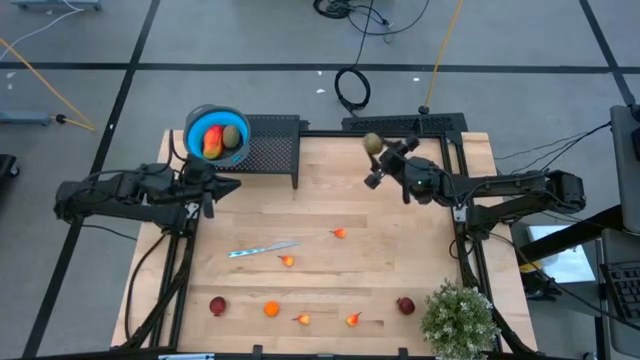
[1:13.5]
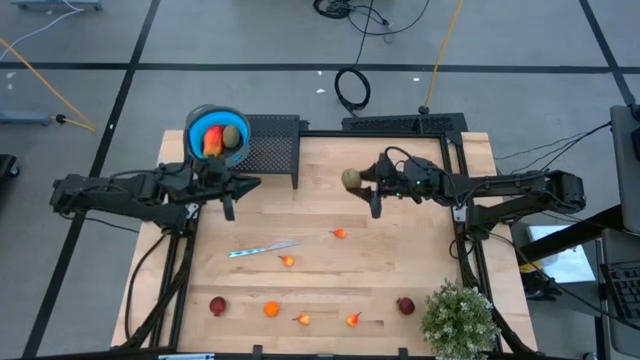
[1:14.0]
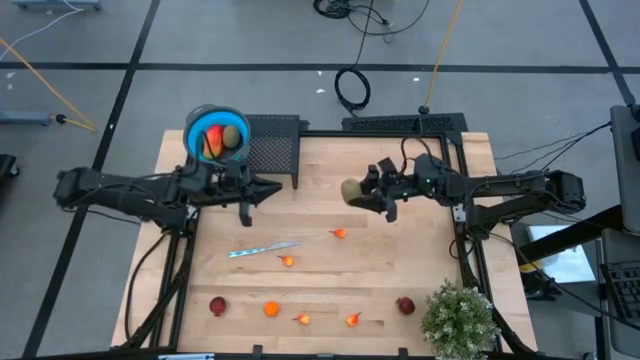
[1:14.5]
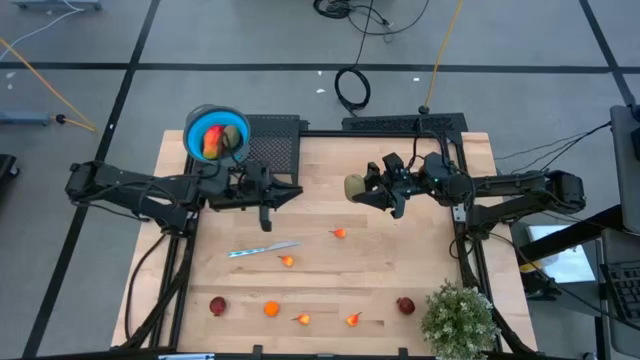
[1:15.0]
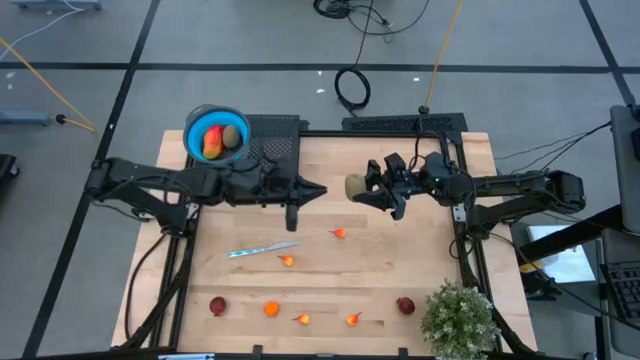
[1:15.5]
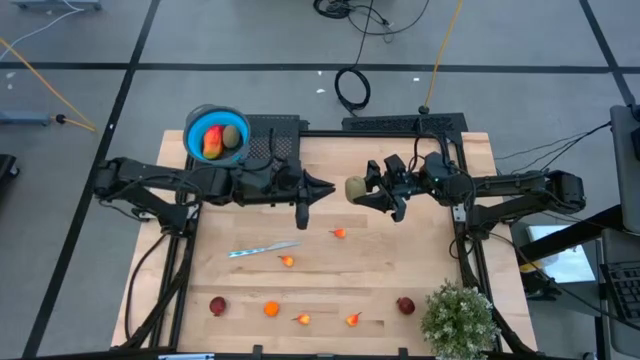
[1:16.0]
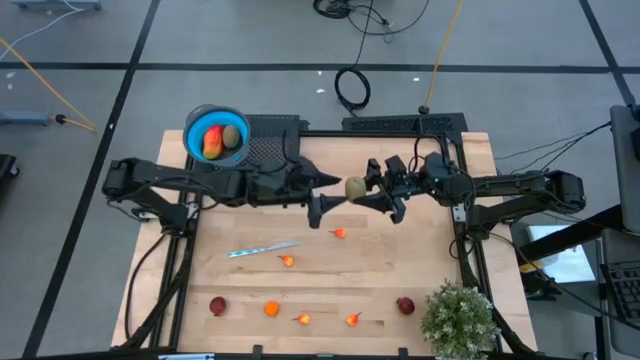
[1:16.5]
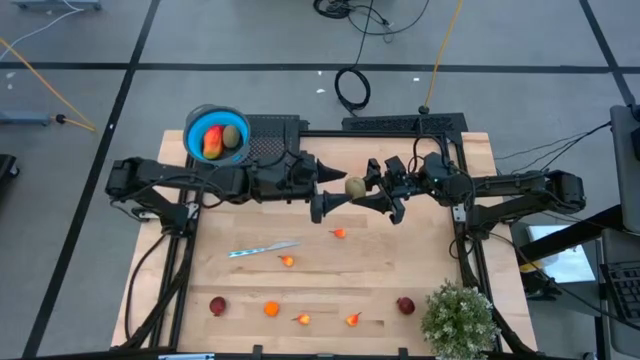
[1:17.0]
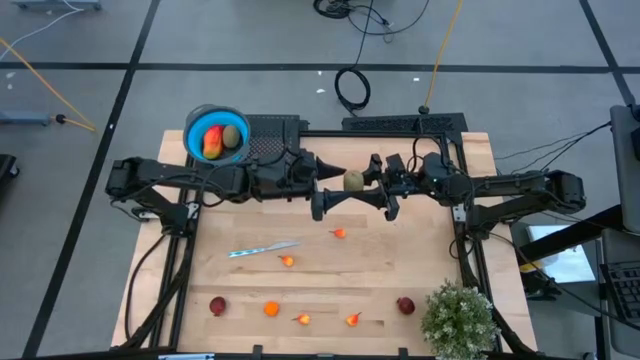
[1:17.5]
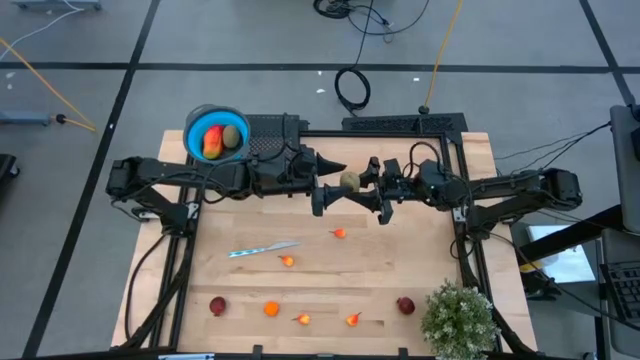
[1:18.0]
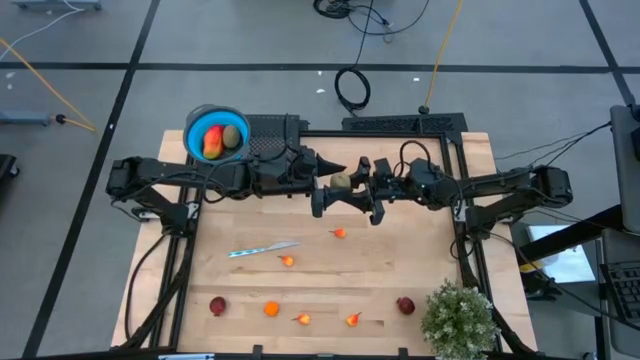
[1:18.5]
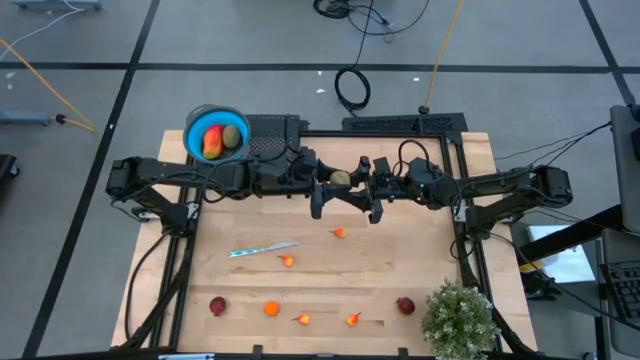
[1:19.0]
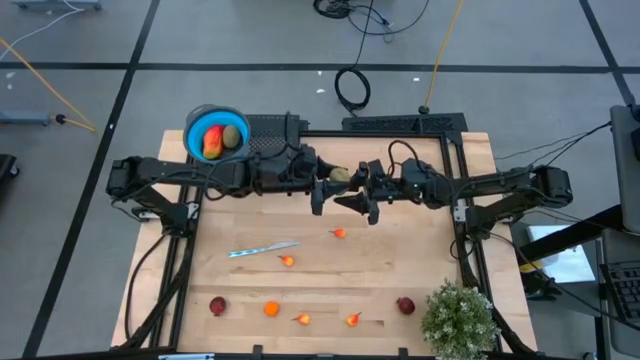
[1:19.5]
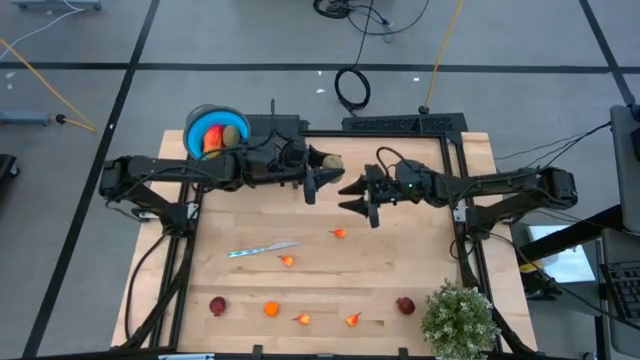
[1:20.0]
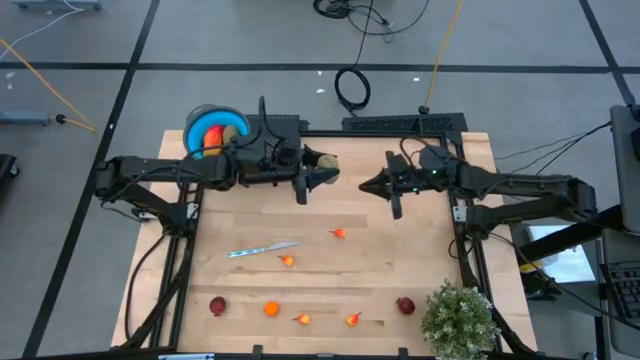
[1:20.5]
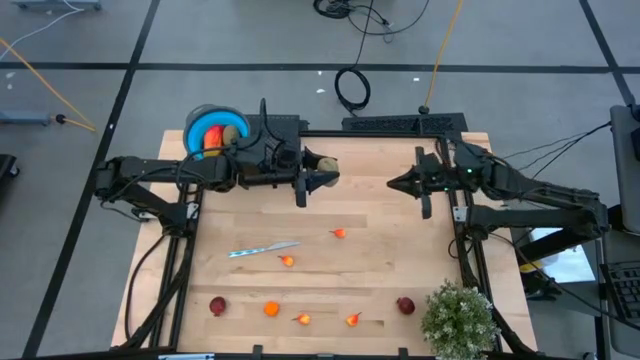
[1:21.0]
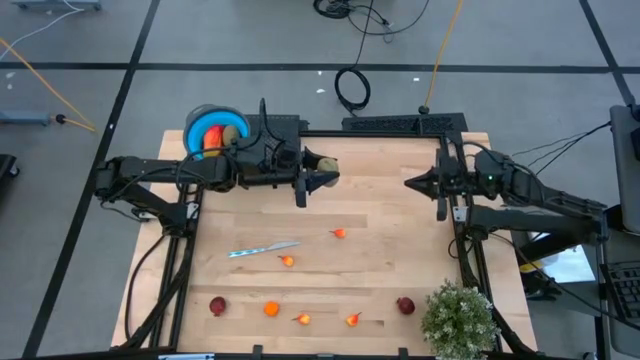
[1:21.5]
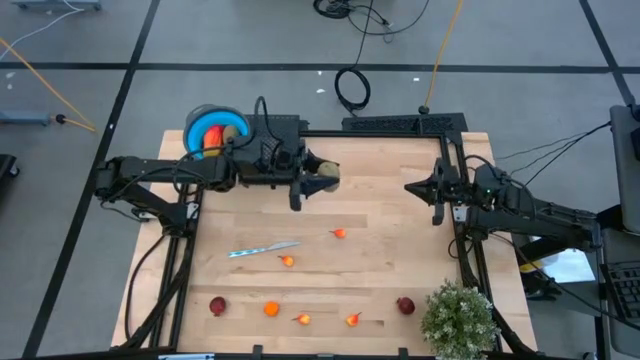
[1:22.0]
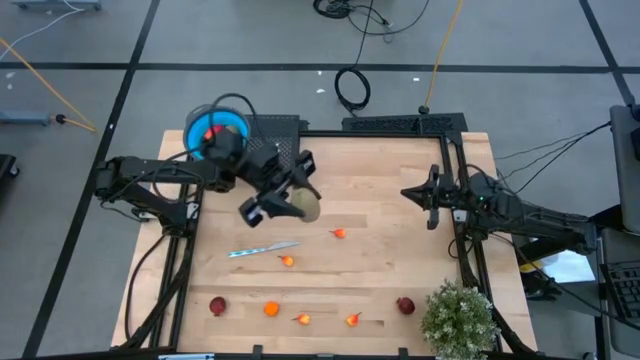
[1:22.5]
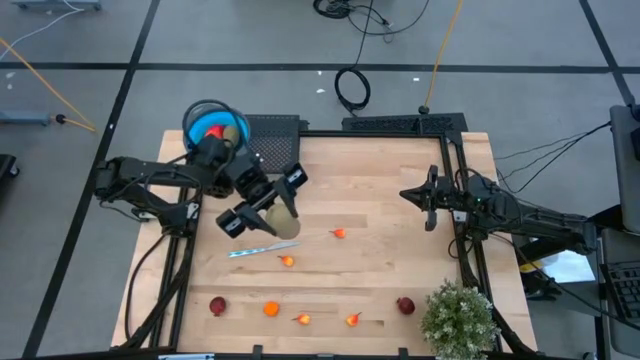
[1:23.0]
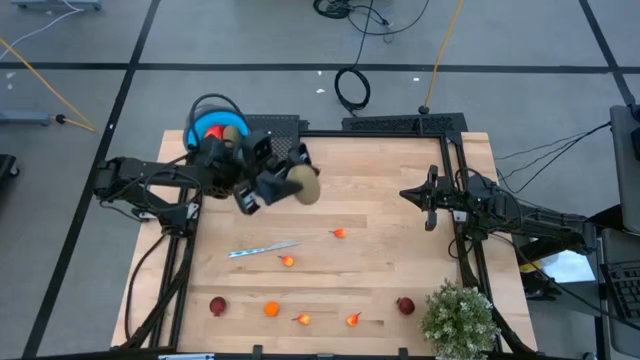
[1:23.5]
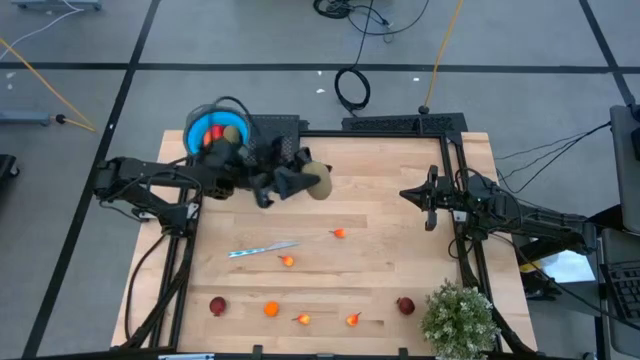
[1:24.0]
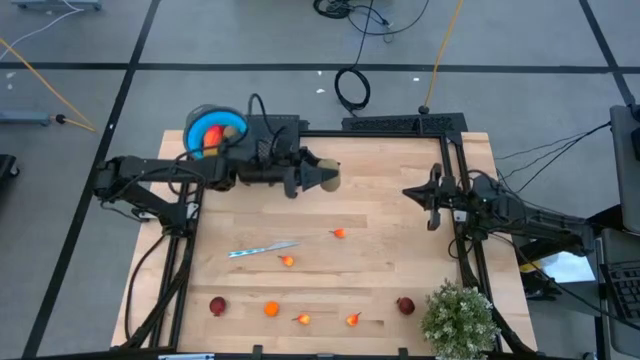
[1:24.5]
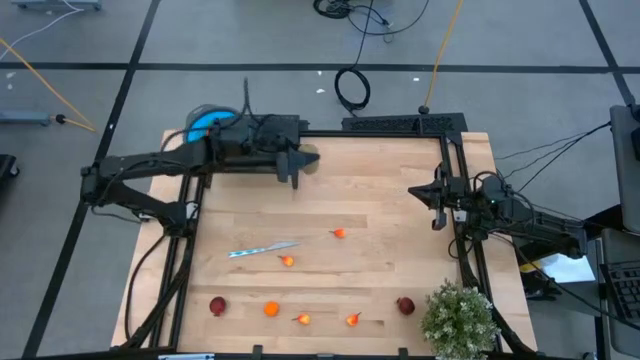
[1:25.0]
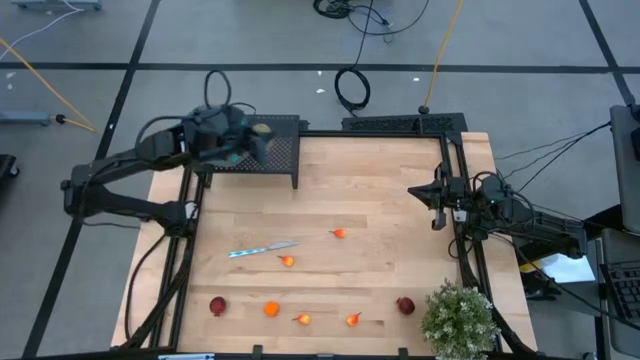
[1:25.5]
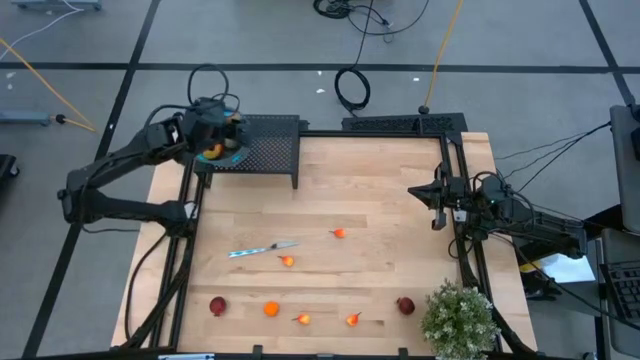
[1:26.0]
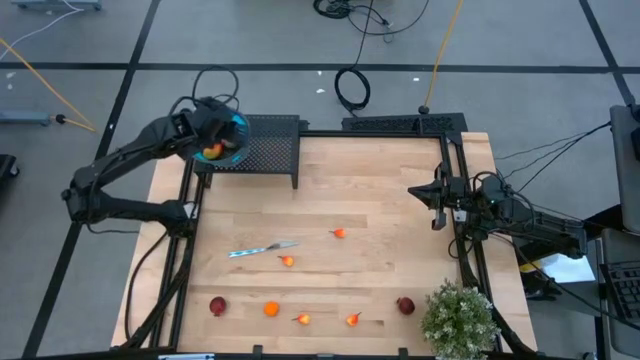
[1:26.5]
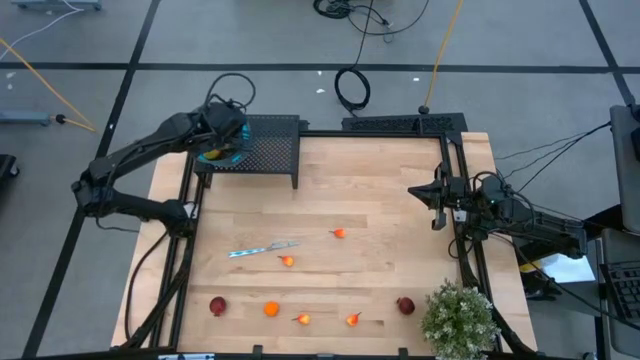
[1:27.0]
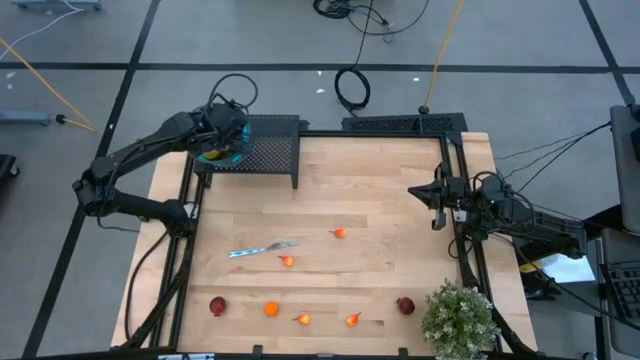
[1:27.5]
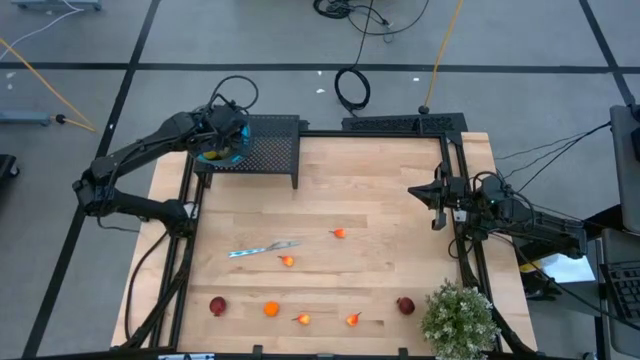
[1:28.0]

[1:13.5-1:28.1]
Task: Pick & Place Fruit
Put the kiwi into the blue strainer bowl on the shelf

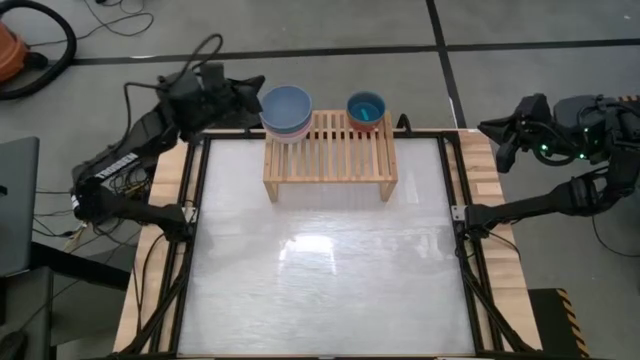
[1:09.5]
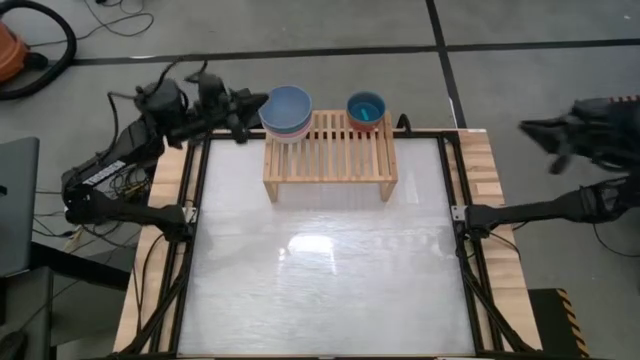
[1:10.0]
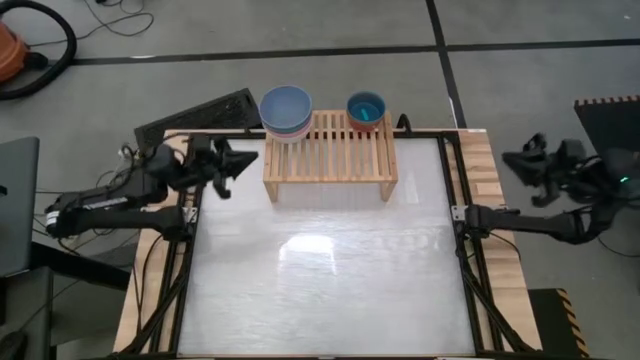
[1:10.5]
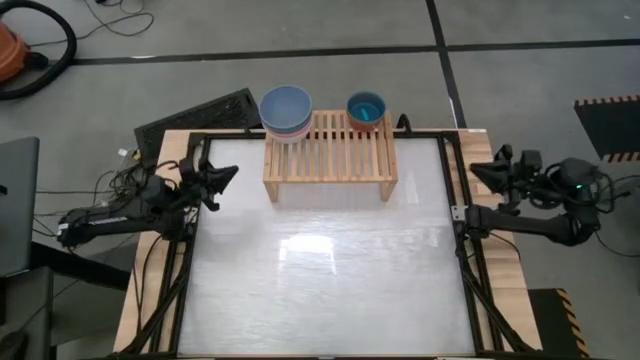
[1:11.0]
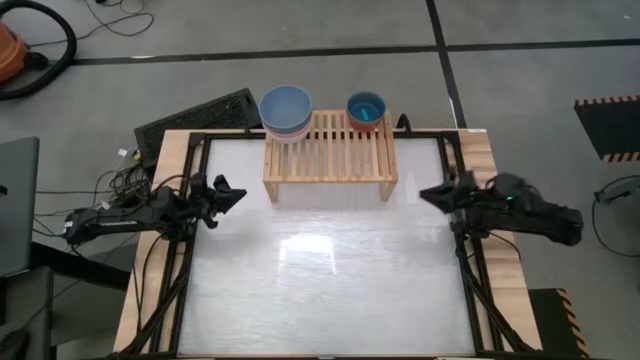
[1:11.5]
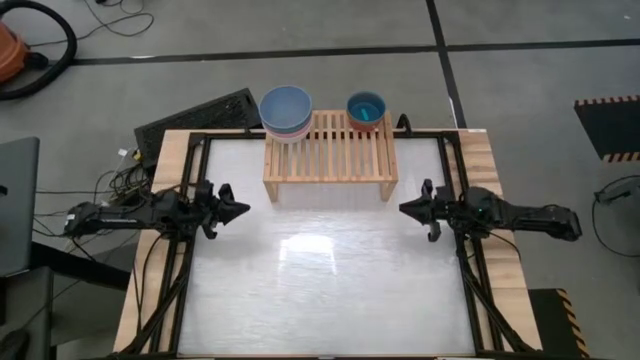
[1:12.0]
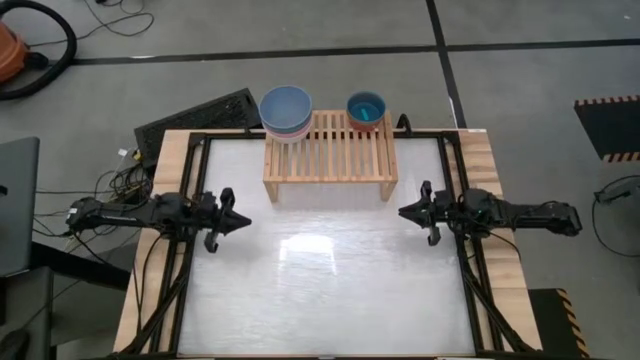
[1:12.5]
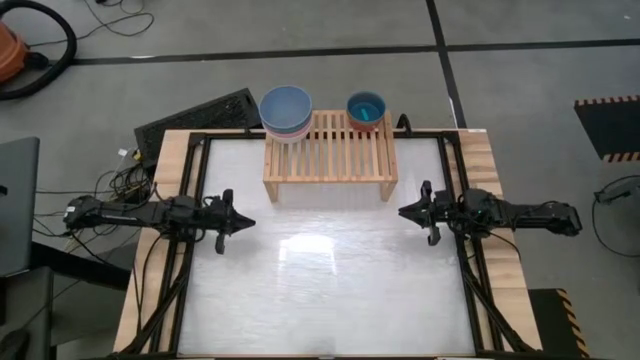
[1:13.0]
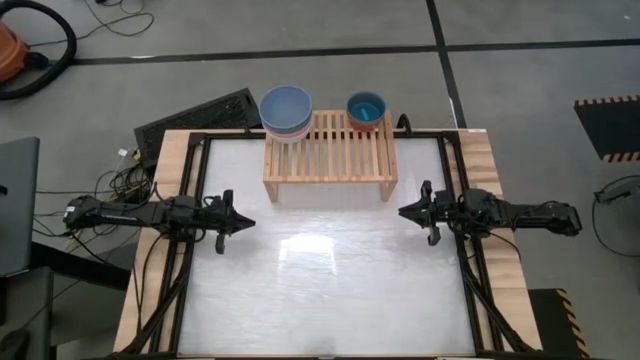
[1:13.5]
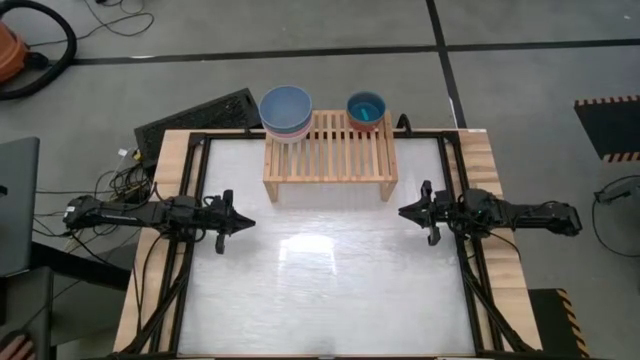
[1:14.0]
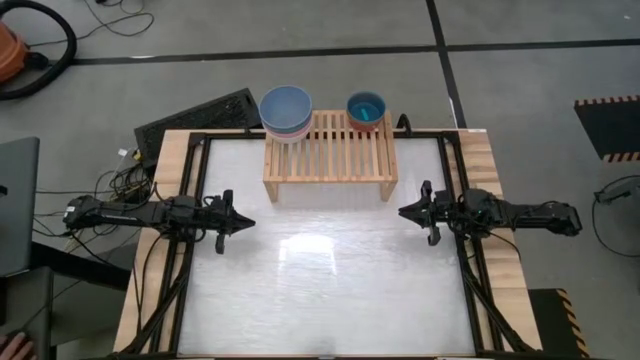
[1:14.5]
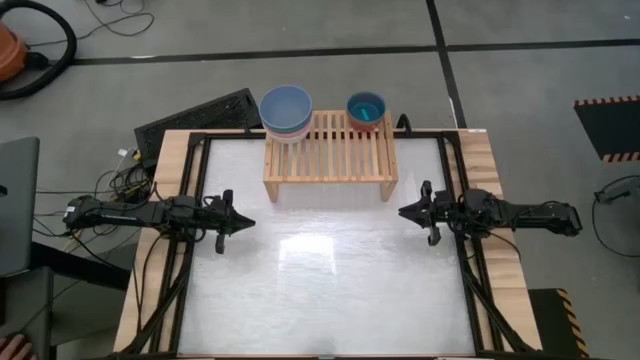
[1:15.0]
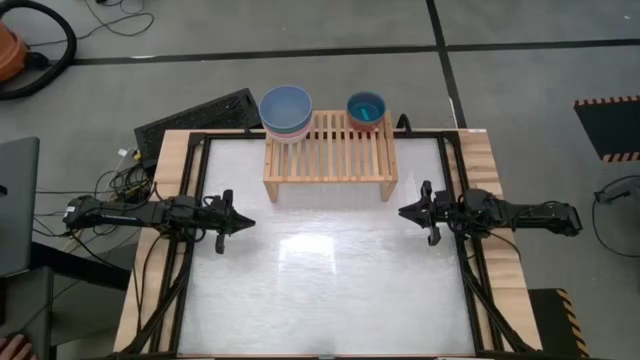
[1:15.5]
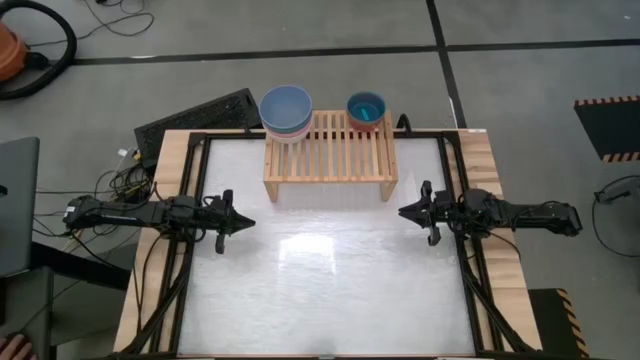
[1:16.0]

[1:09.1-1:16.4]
Task: Place and stack bowls onto a shelf
Return to Home Position
